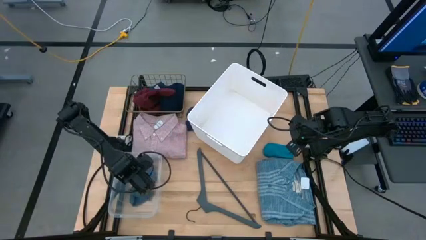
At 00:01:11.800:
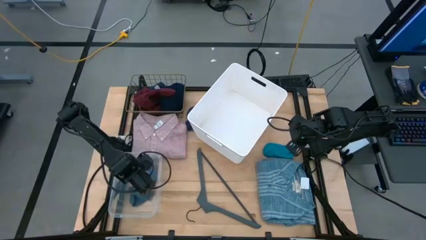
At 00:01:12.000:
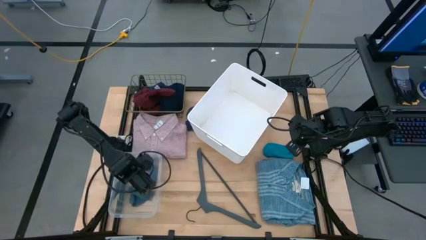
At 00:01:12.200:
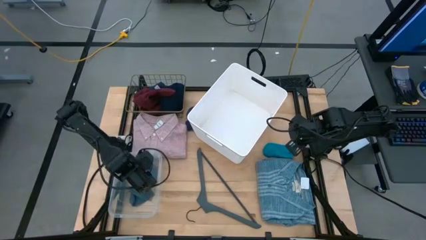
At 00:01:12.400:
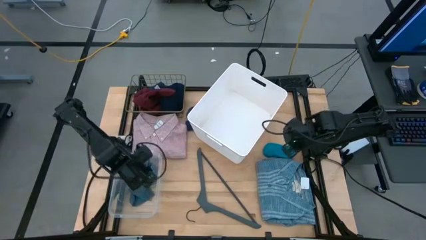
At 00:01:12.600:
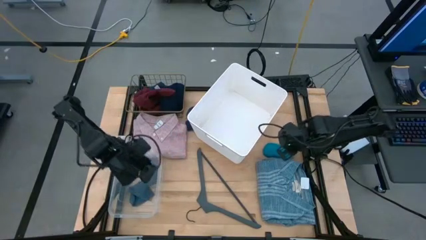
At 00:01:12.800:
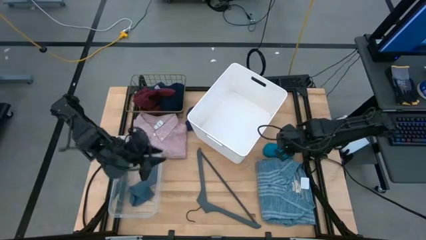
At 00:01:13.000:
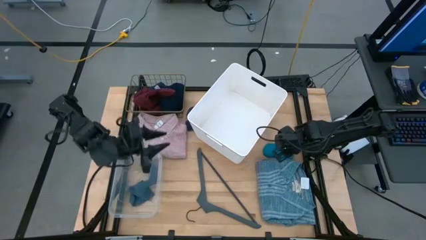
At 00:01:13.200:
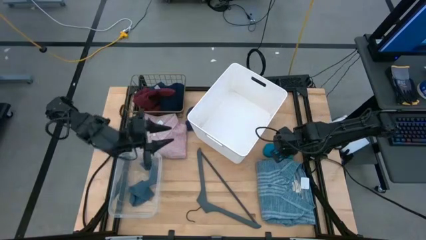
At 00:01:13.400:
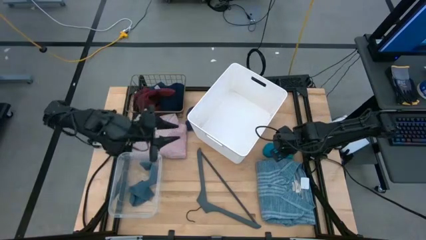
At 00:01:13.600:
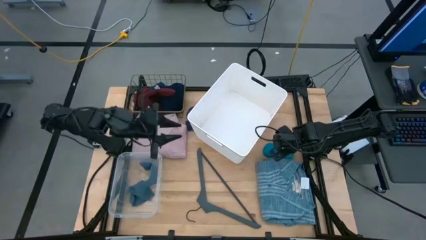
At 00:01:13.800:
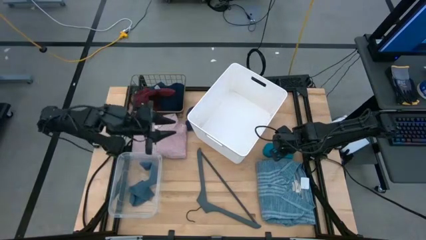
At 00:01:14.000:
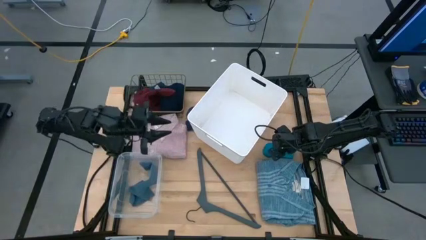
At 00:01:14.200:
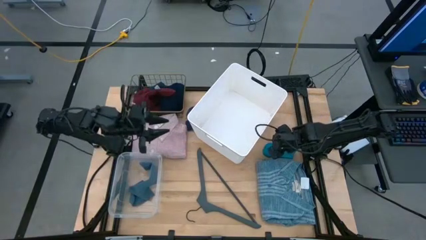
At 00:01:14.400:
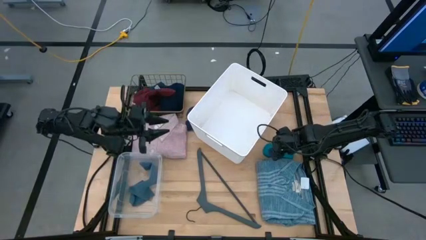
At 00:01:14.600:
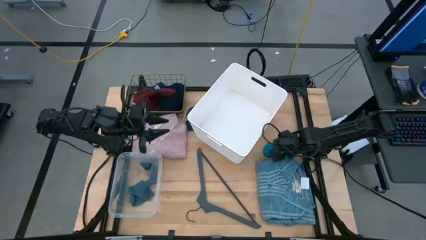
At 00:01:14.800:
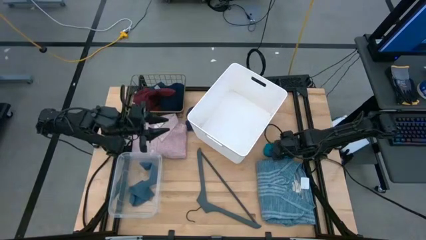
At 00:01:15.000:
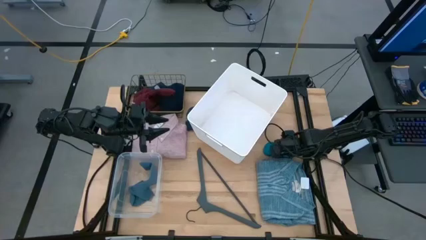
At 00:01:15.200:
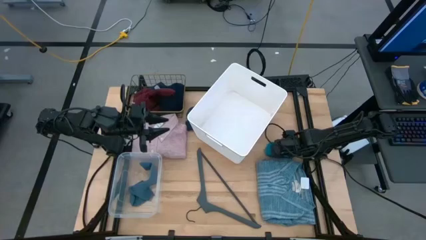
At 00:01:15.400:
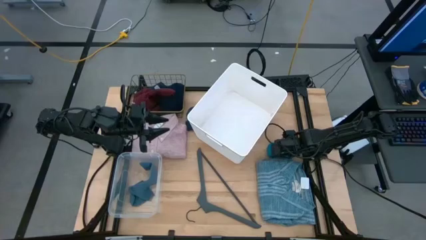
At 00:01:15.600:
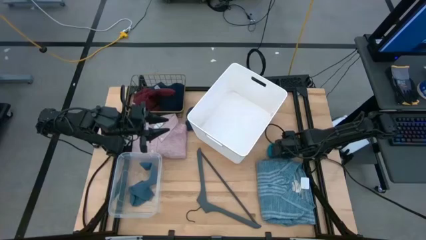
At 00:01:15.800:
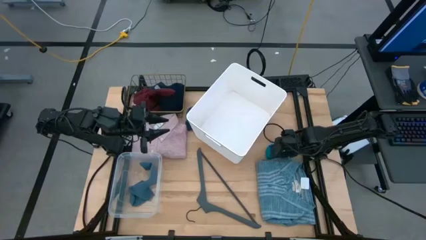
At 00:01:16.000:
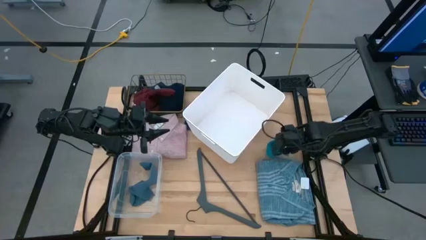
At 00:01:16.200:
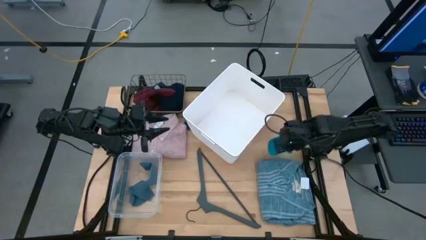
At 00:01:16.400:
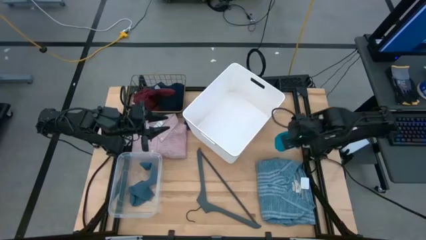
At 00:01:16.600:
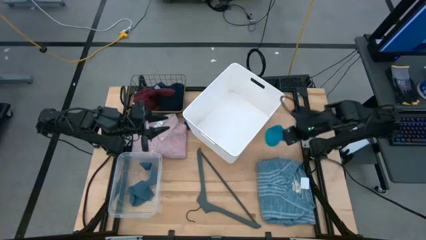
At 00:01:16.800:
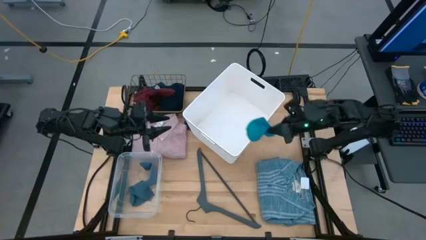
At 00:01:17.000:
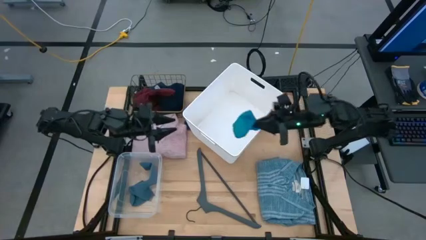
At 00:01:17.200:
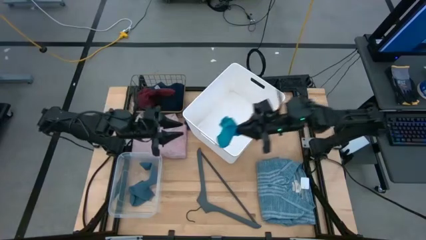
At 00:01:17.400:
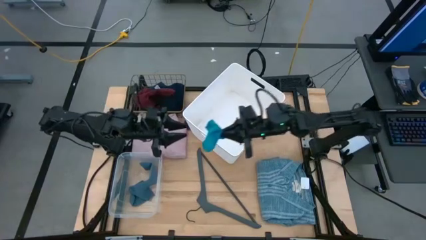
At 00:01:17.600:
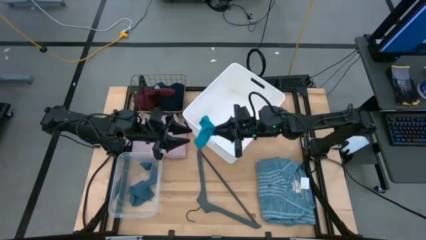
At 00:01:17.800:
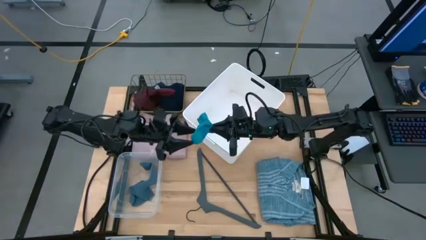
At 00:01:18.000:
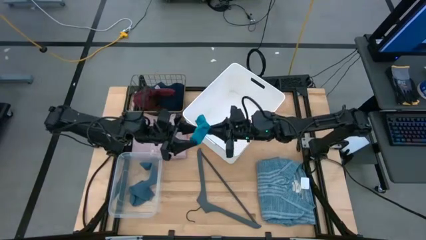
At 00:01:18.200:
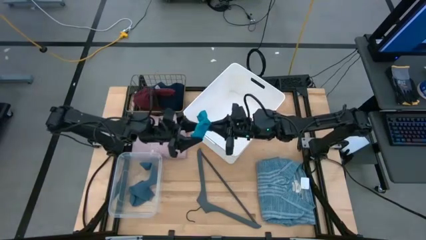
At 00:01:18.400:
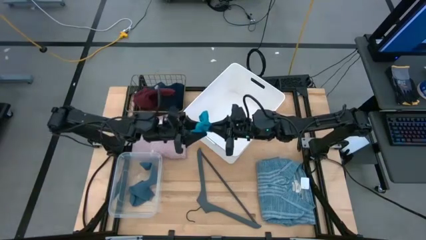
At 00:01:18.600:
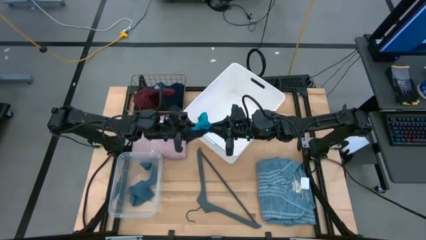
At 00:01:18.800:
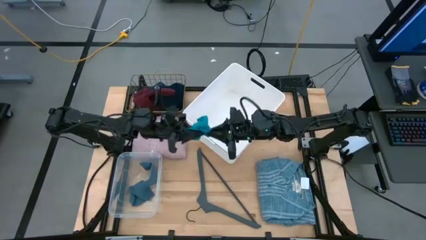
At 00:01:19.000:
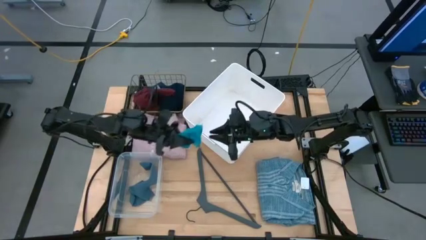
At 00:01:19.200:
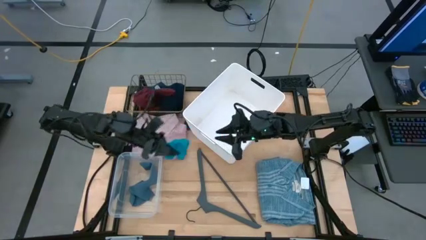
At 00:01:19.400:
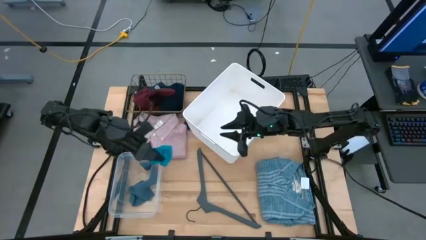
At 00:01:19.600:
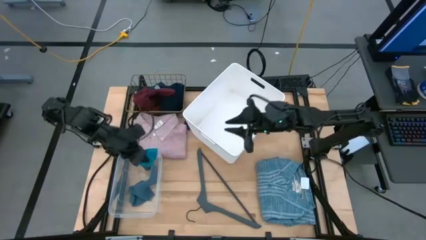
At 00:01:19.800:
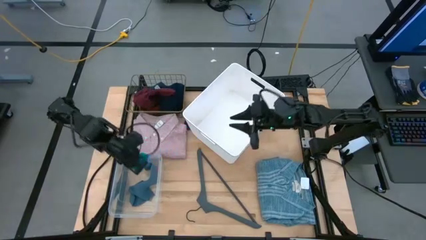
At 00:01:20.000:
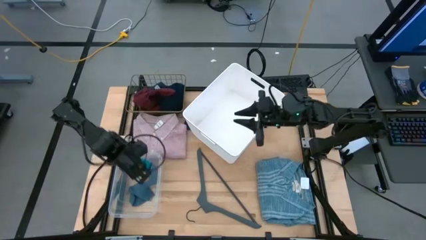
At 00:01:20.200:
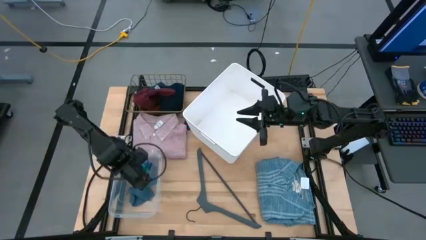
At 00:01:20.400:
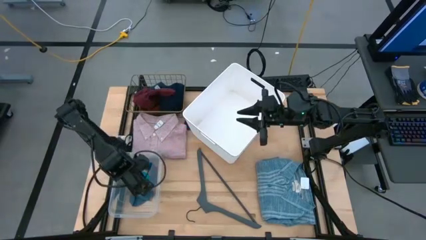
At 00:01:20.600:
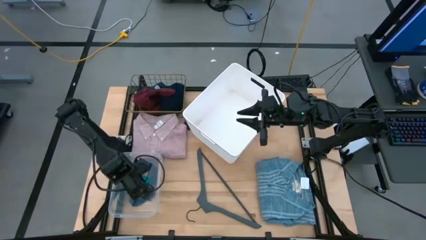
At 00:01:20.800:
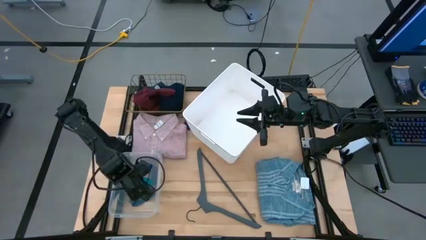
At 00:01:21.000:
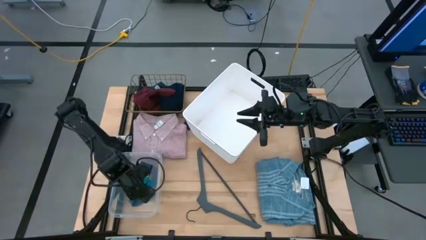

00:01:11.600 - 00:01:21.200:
Task: Pick & Place Cloths
Put the light blue sock into the transparent bin

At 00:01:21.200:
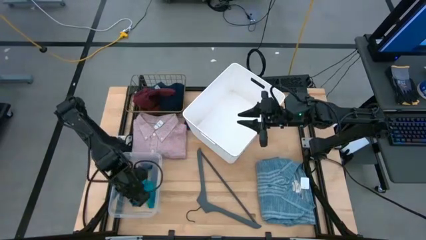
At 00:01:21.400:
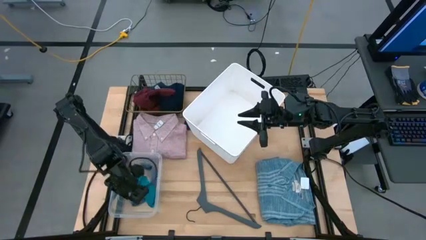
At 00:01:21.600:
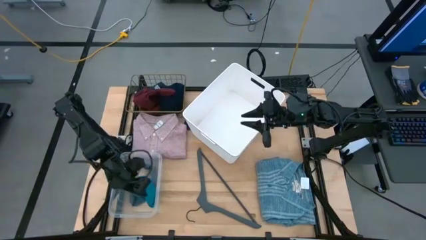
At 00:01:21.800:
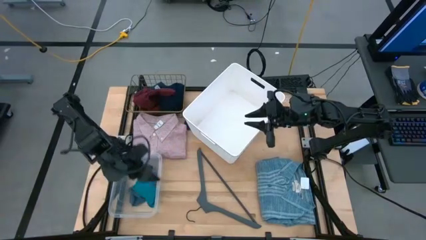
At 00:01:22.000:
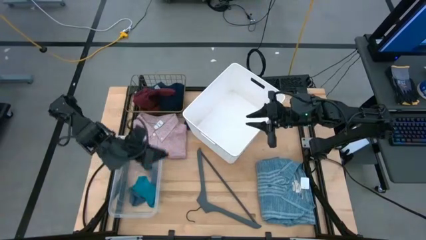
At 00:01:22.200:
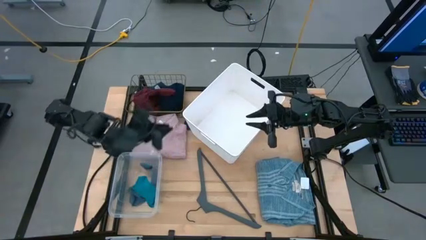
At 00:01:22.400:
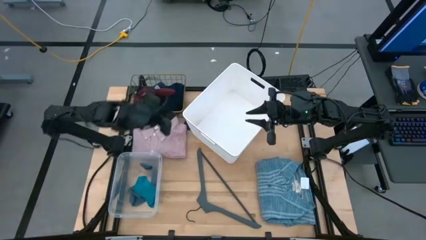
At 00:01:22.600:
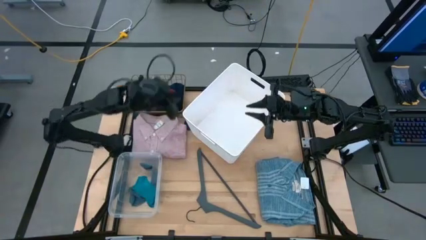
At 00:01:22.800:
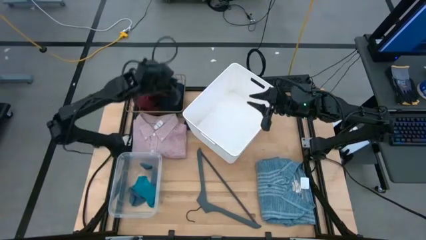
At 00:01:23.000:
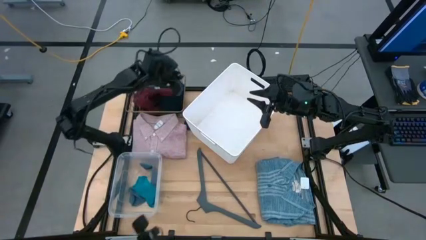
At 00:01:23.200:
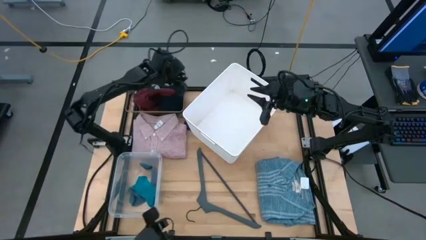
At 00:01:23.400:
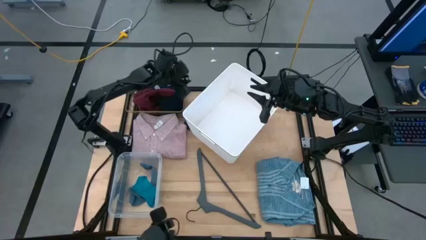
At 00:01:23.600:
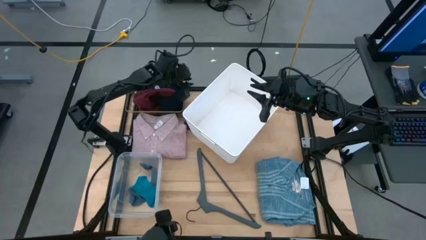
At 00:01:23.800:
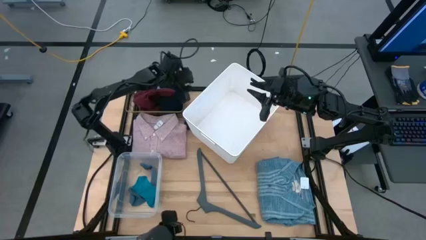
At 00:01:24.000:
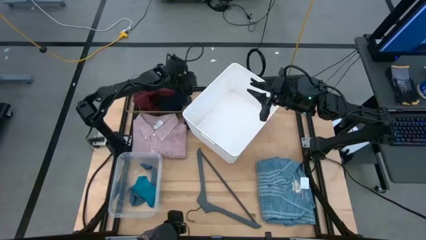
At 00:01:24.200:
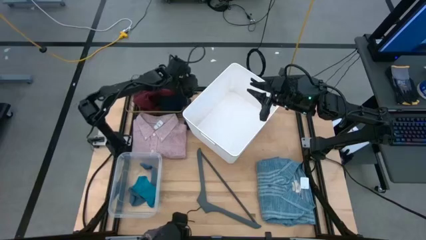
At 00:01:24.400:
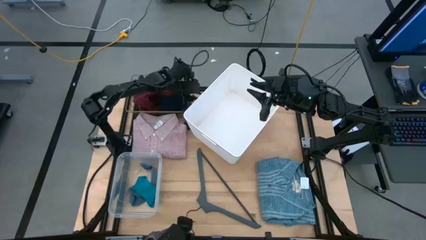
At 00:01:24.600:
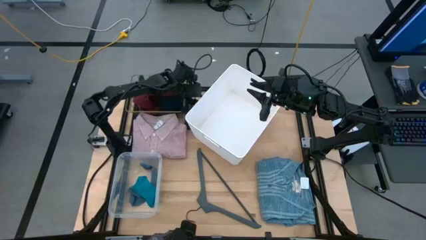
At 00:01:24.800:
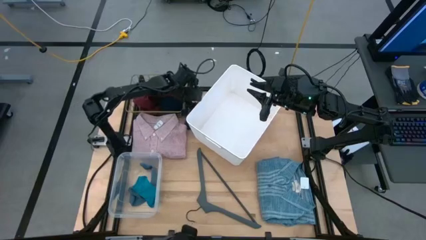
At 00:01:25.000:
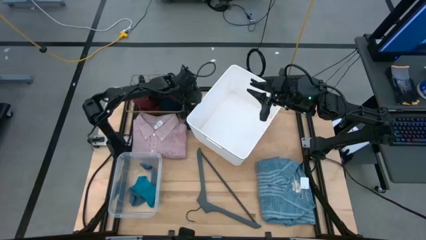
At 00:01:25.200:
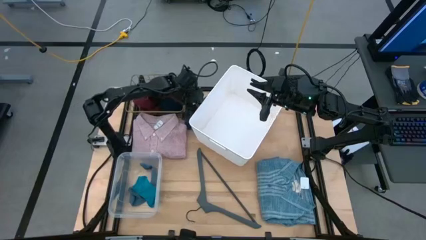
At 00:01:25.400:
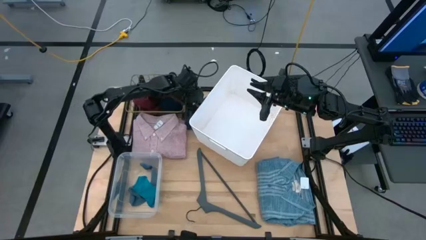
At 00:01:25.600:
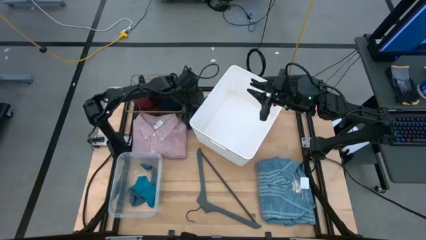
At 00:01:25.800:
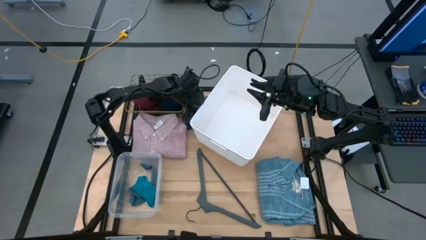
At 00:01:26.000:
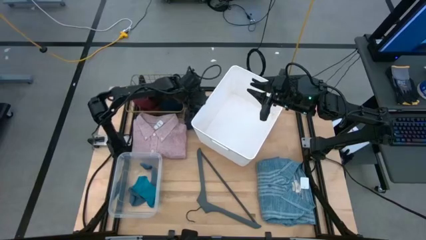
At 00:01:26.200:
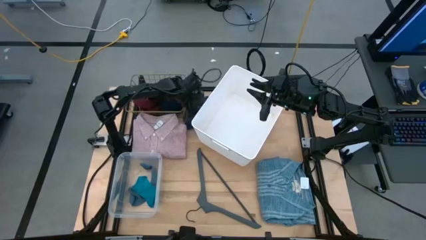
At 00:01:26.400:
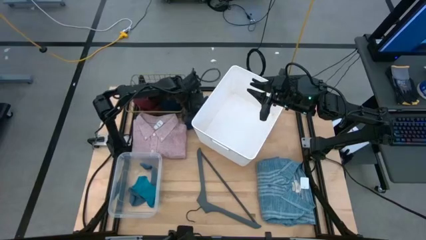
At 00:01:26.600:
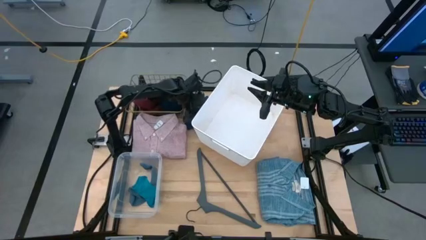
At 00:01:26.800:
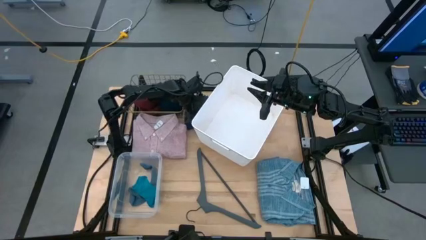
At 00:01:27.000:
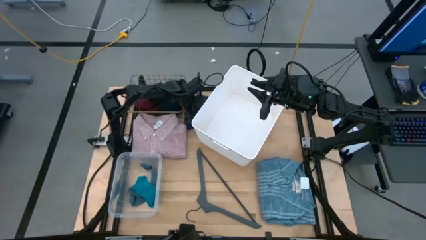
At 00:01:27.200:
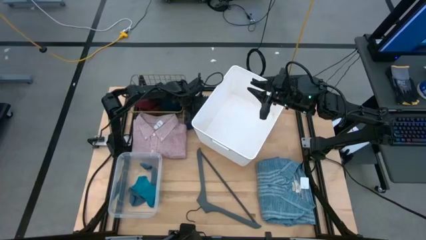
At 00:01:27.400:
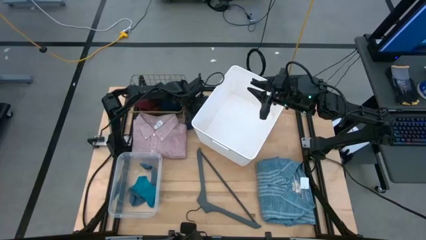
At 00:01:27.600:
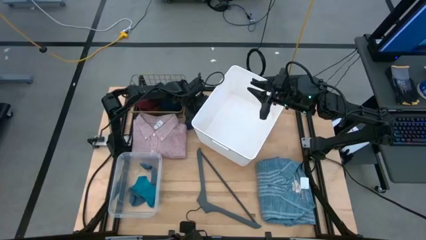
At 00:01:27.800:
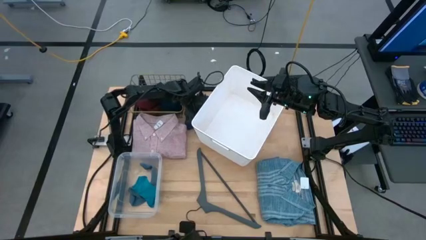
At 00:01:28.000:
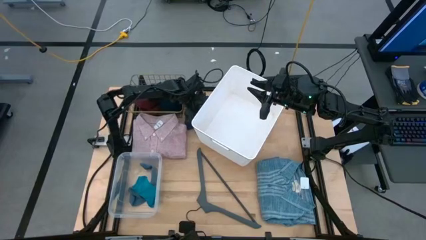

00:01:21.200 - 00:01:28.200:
Put the dark blue sock into the transparent bin
